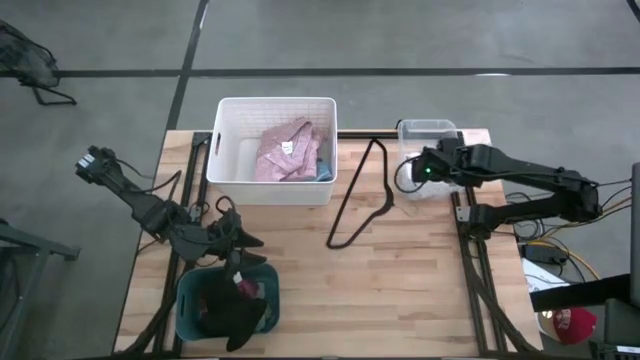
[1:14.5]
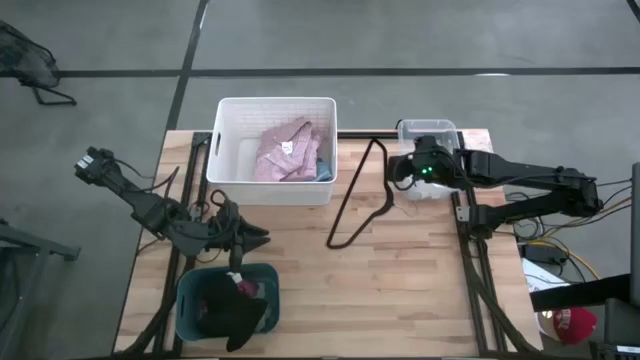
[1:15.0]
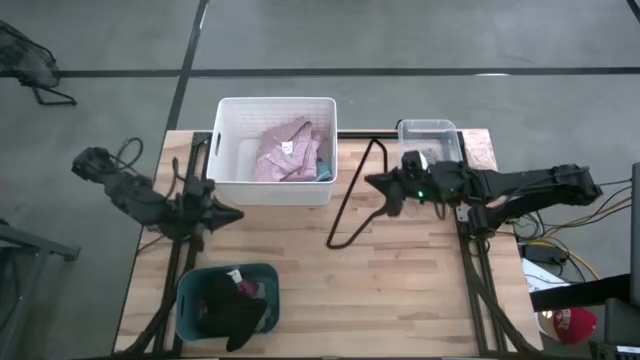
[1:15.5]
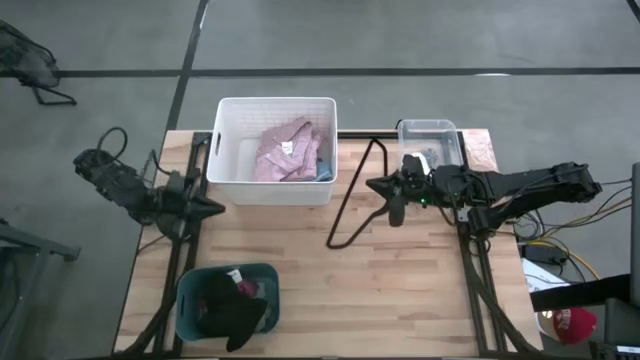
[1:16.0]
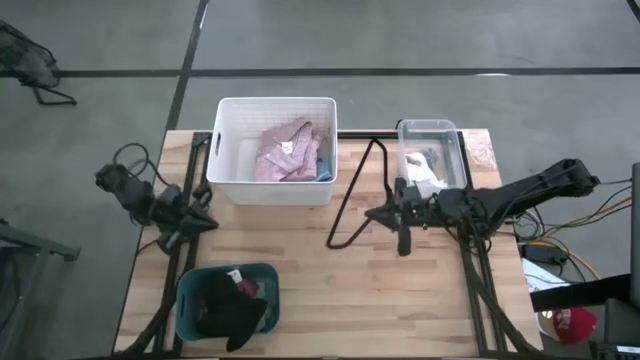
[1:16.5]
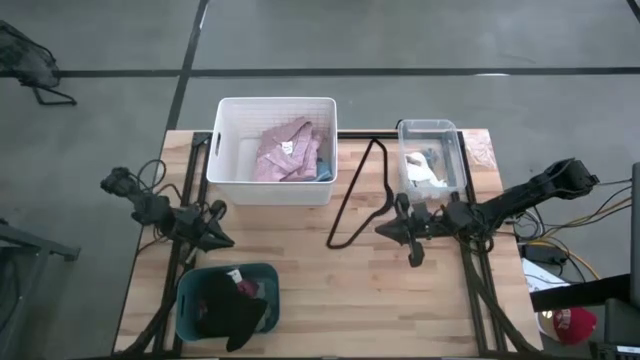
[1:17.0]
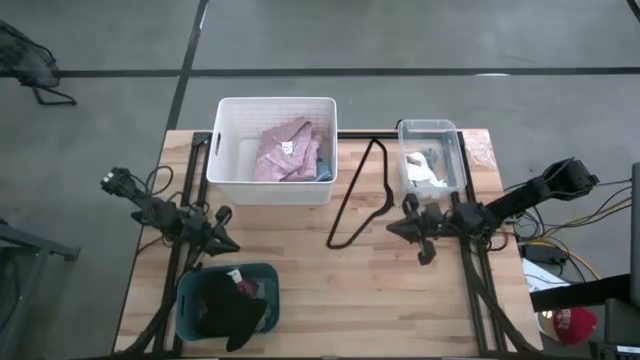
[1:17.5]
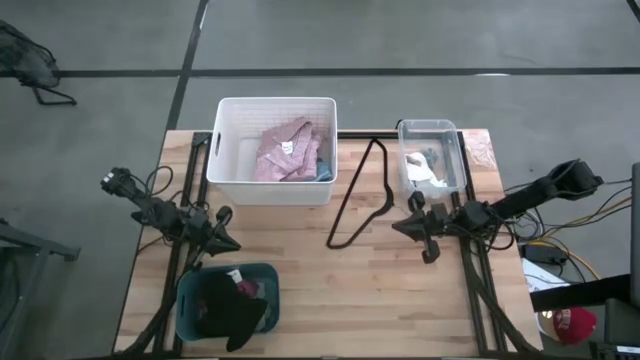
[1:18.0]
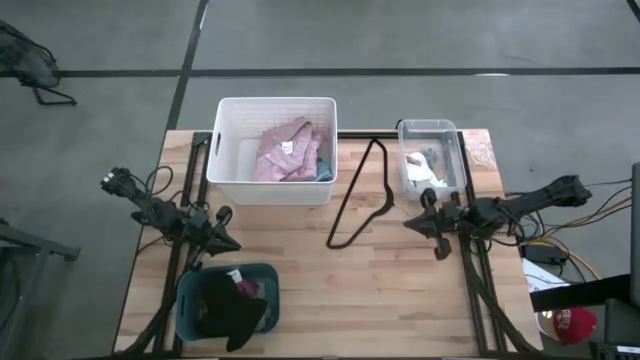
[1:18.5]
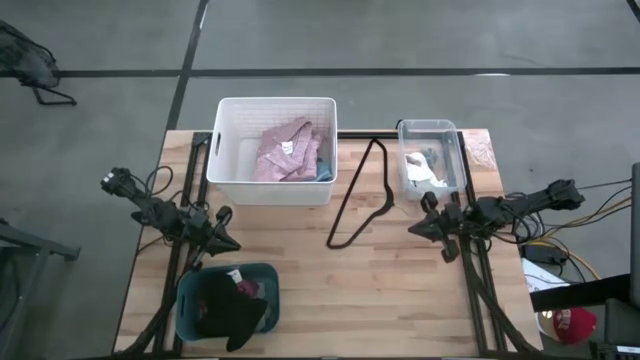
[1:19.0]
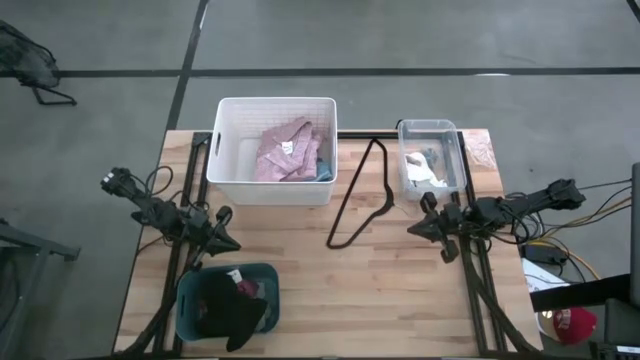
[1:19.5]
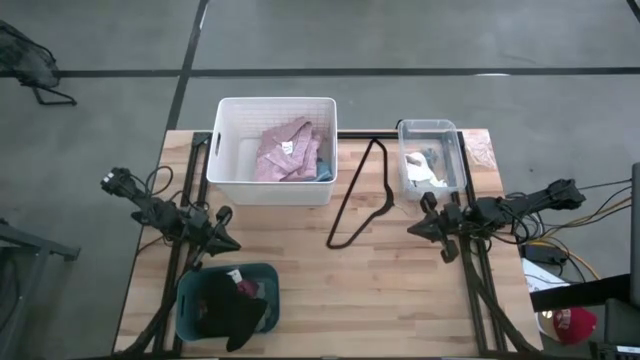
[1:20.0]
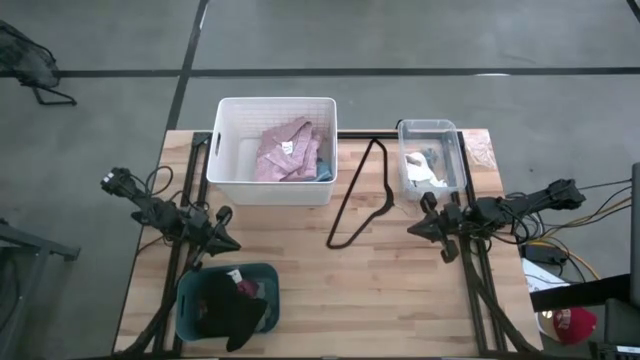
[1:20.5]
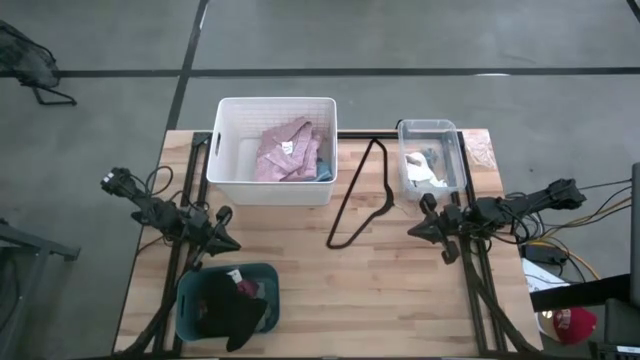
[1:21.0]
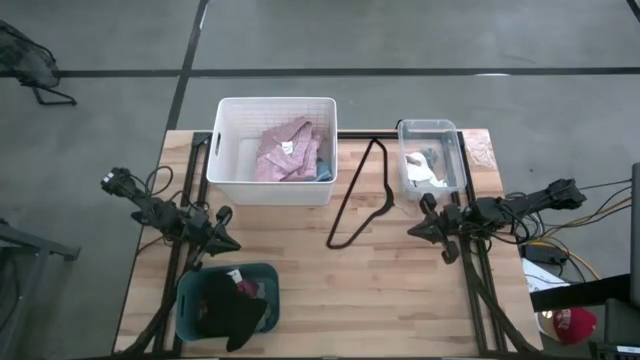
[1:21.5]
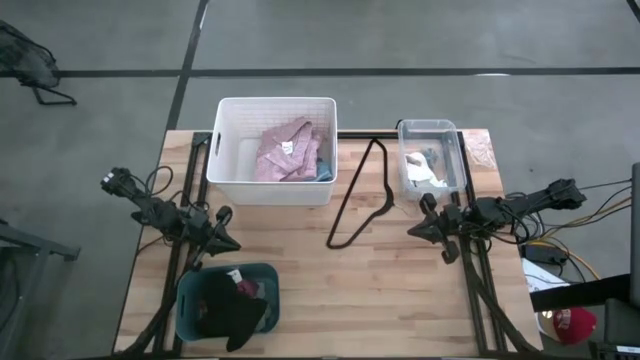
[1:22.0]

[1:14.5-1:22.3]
Task: Pick & Place Cloths
Return to Home Position

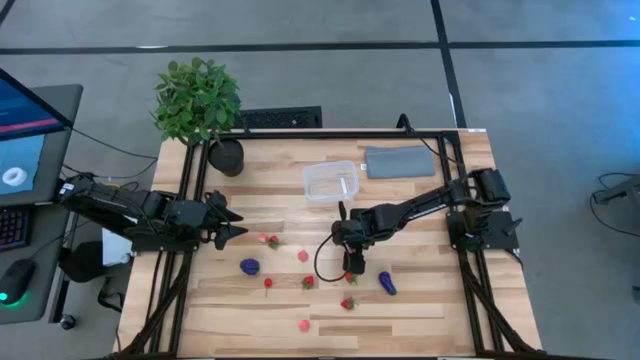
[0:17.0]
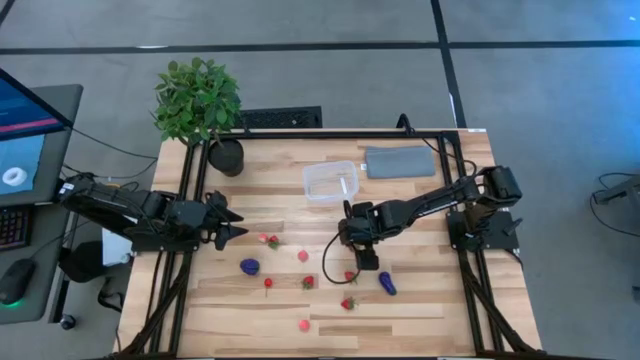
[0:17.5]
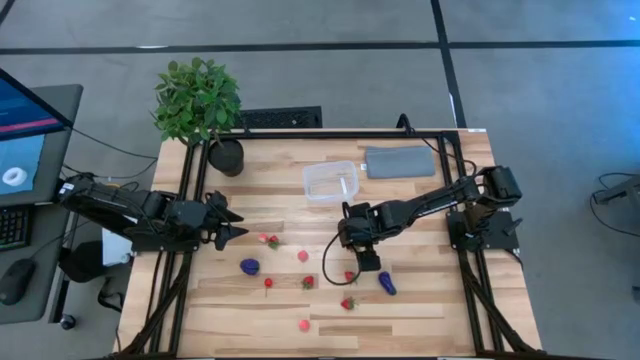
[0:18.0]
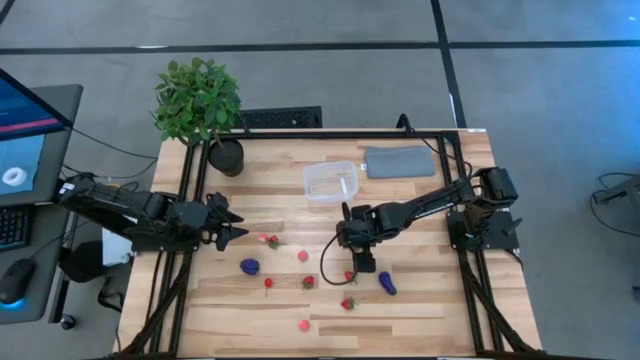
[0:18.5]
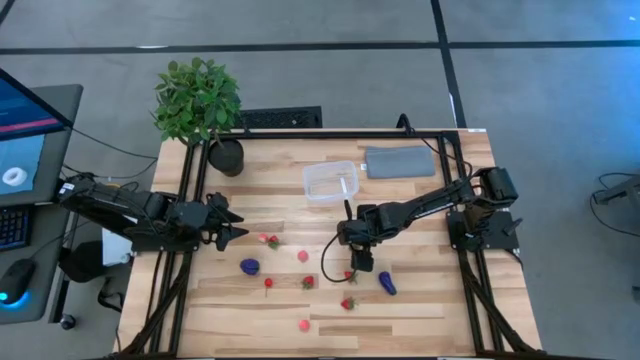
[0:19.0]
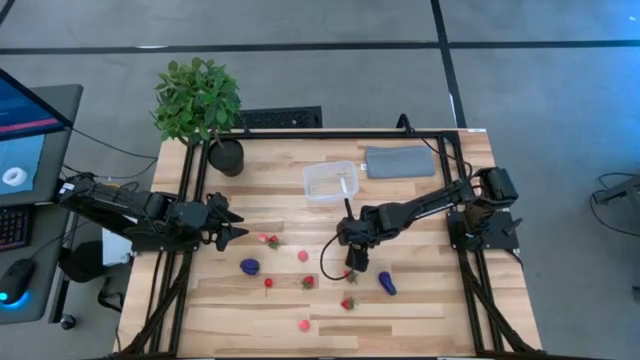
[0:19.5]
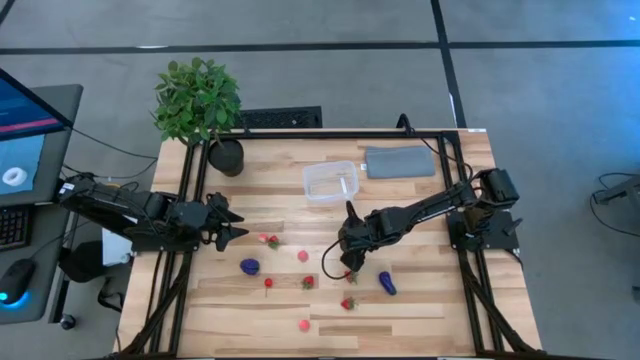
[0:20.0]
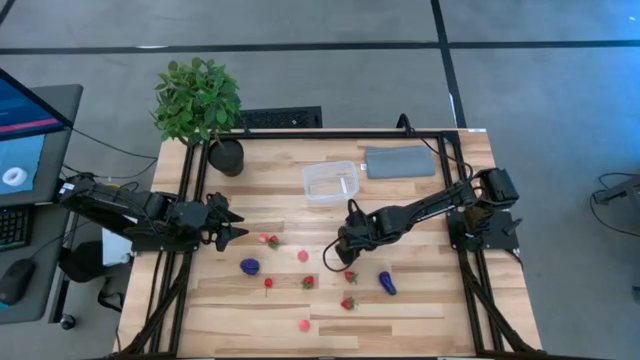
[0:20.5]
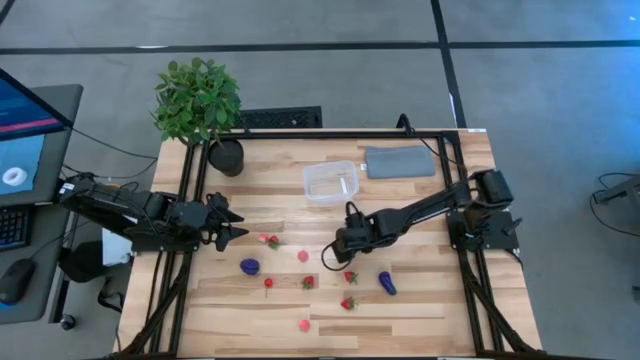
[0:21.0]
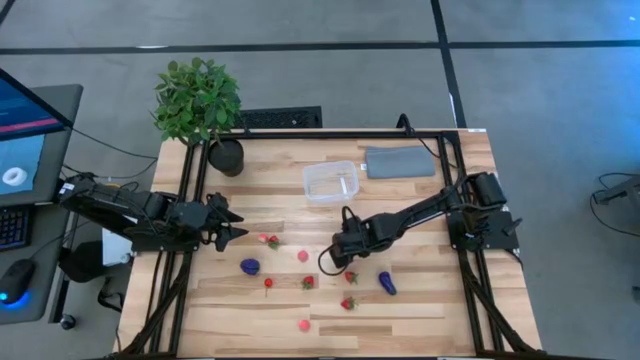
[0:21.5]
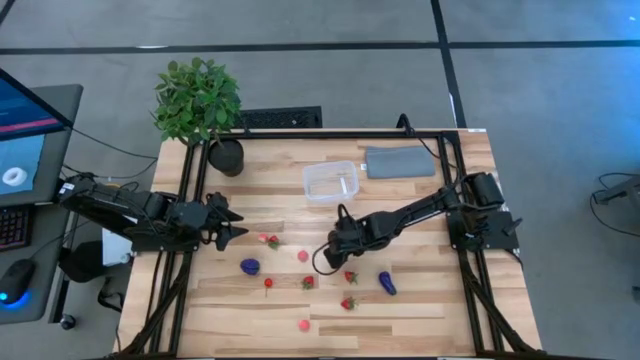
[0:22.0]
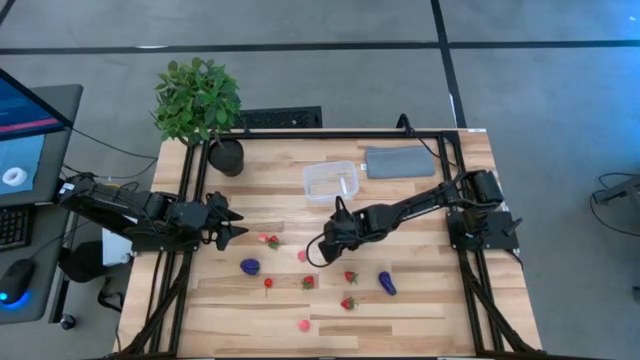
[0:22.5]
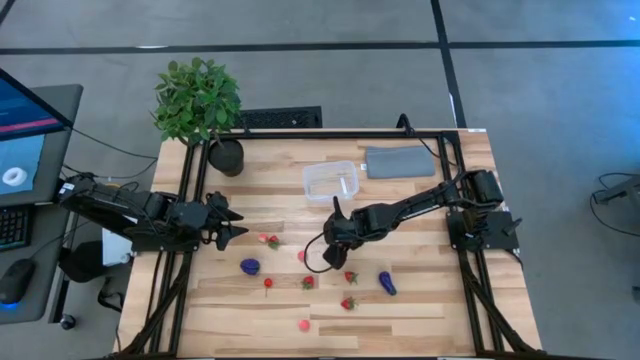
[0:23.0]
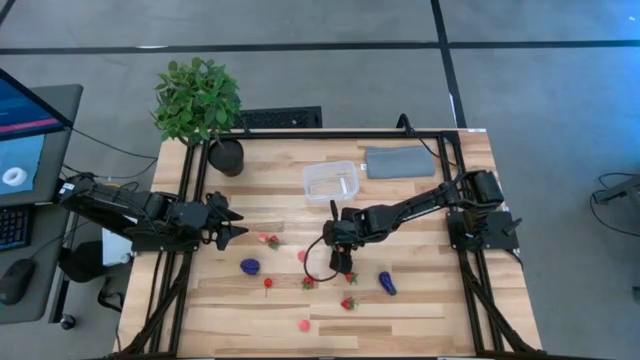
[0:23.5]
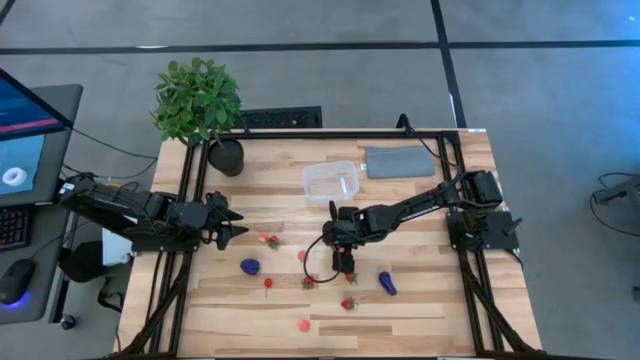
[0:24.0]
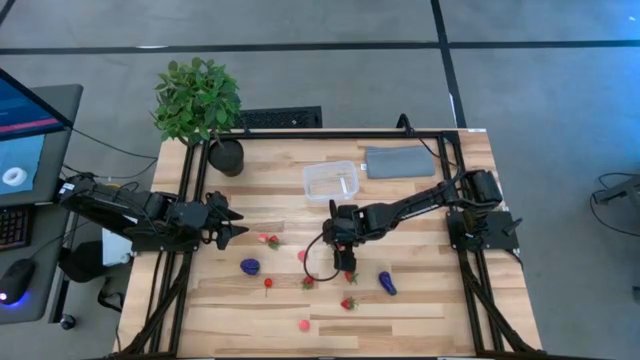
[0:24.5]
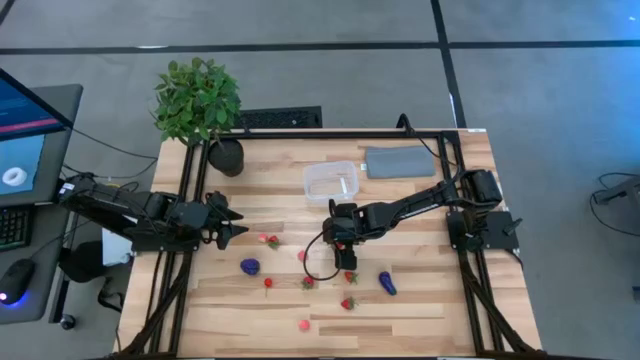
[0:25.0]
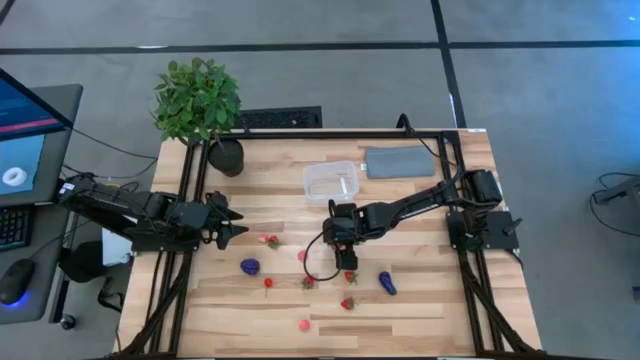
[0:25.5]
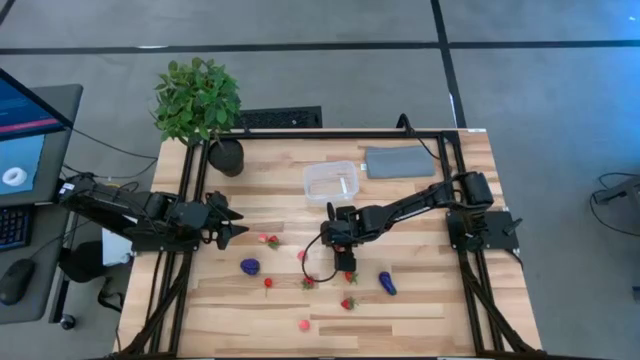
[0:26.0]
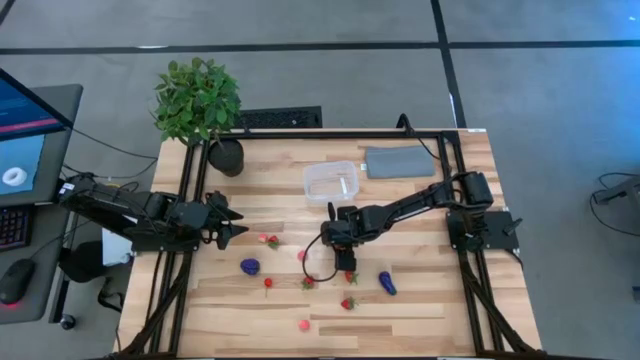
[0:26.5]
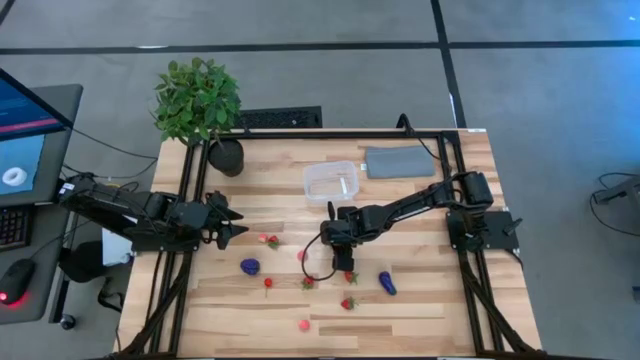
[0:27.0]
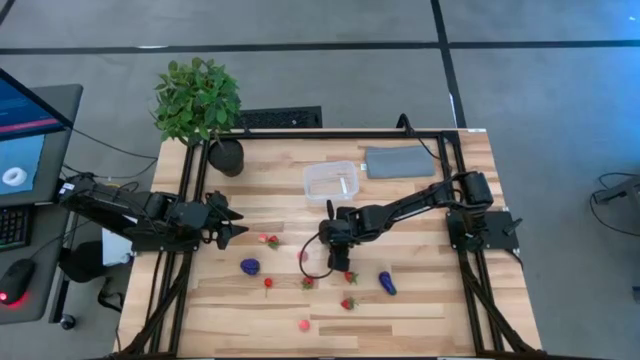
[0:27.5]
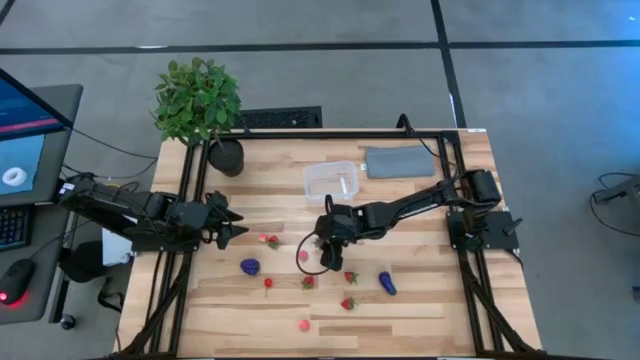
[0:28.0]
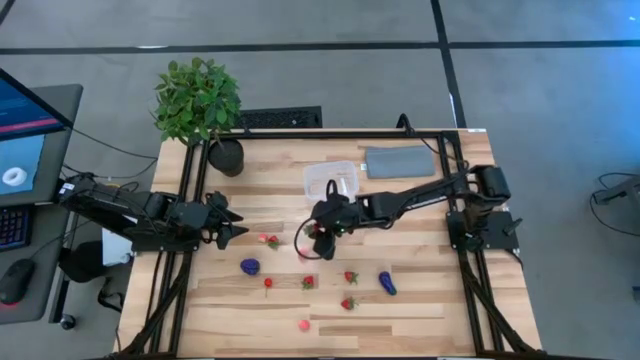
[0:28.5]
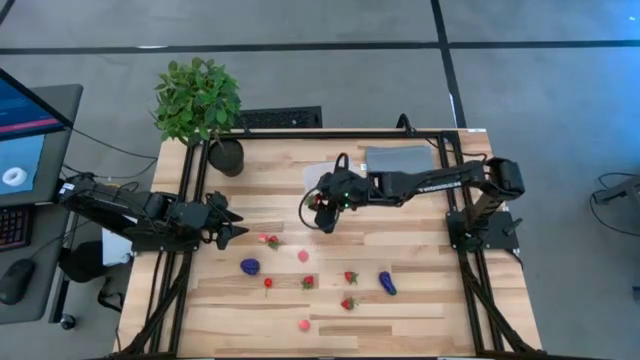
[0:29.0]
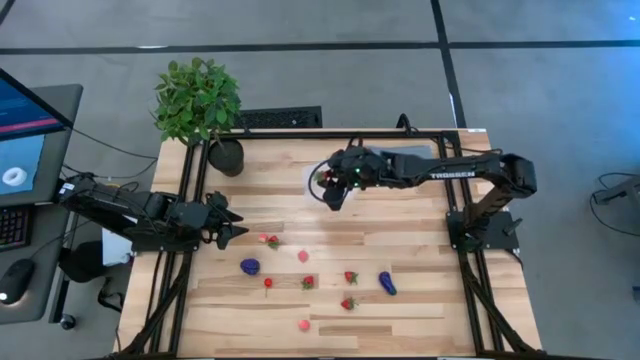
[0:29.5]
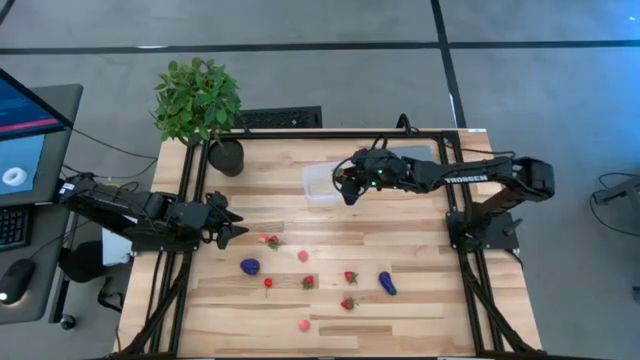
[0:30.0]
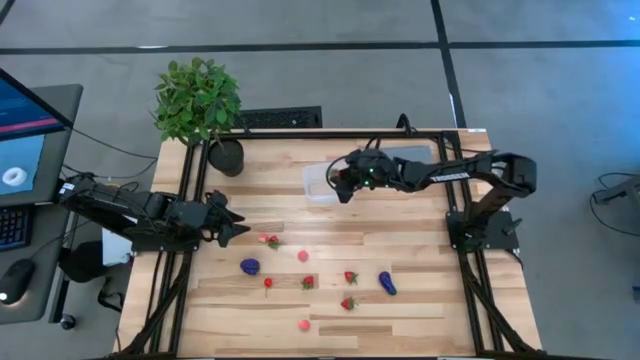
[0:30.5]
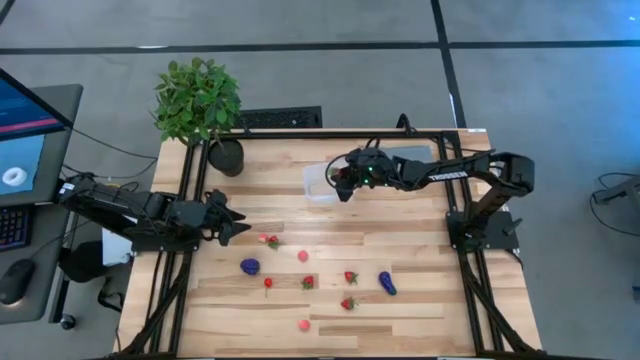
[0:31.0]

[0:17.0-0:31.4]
Task: Pick and placing Produce into tupperware
Put the strawberry into the container
